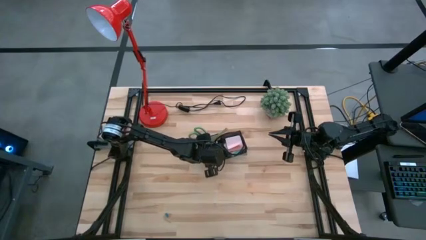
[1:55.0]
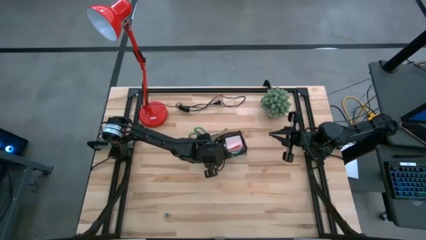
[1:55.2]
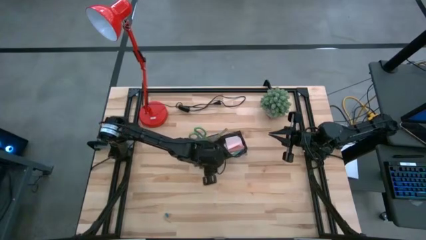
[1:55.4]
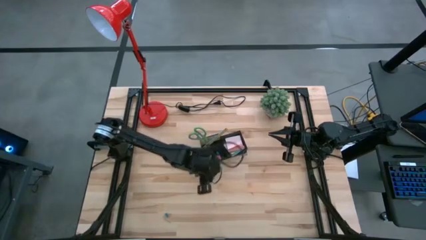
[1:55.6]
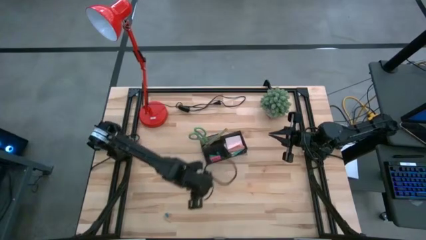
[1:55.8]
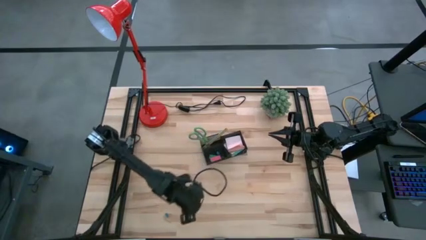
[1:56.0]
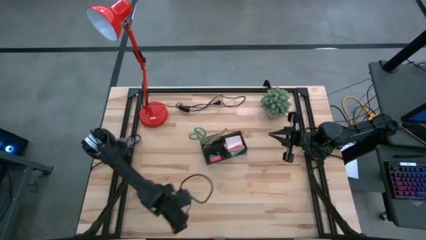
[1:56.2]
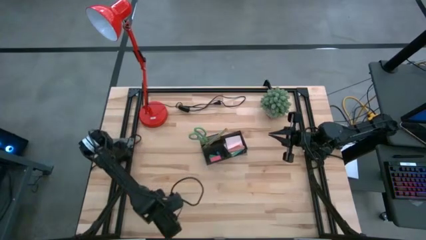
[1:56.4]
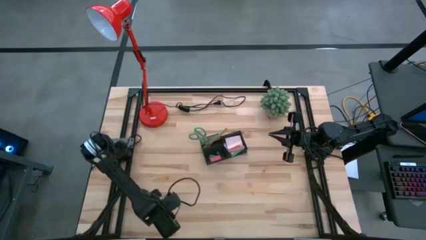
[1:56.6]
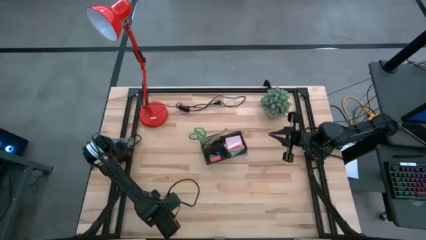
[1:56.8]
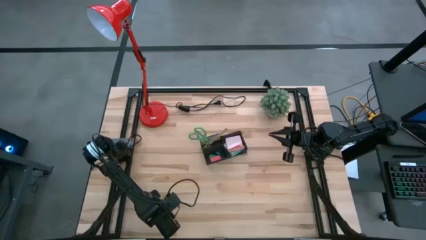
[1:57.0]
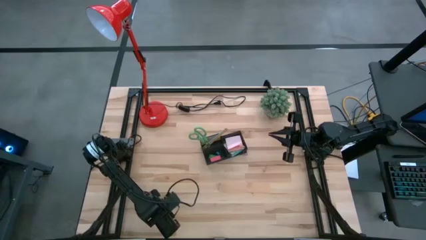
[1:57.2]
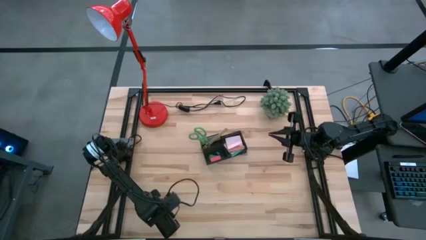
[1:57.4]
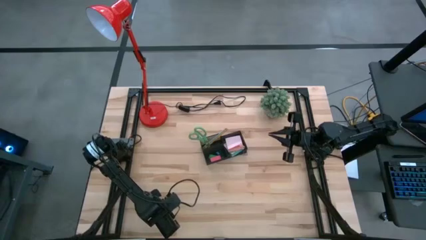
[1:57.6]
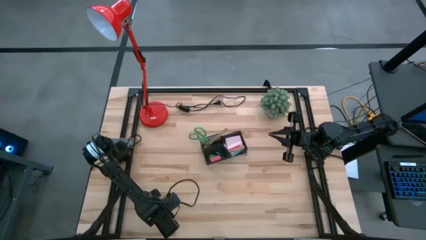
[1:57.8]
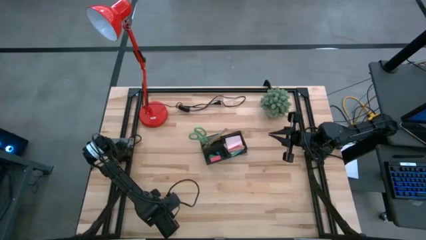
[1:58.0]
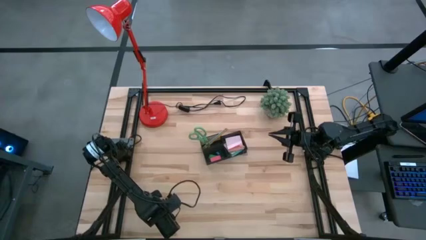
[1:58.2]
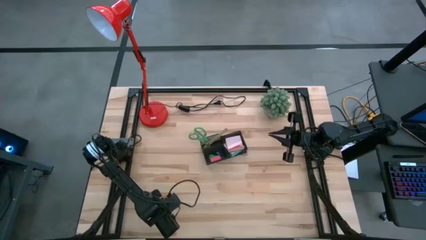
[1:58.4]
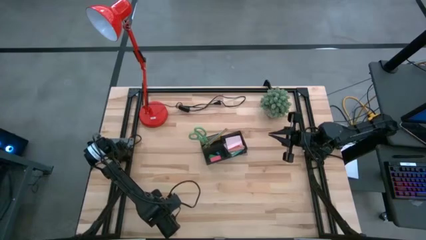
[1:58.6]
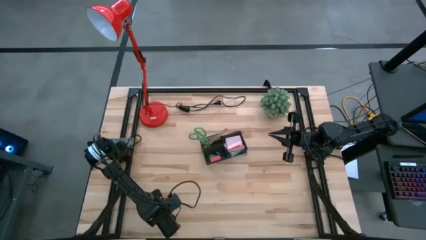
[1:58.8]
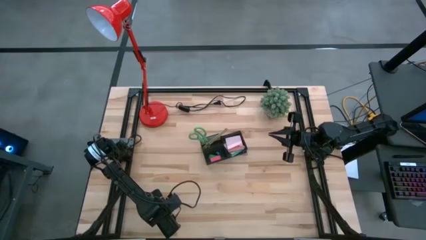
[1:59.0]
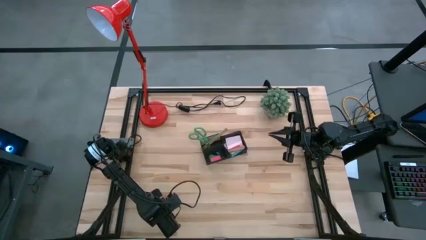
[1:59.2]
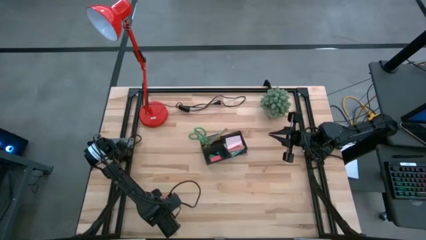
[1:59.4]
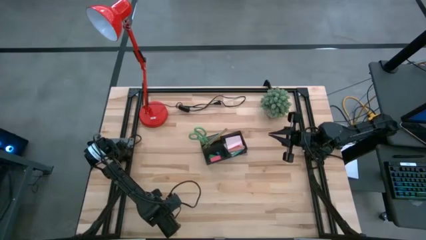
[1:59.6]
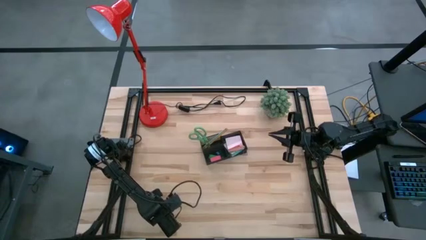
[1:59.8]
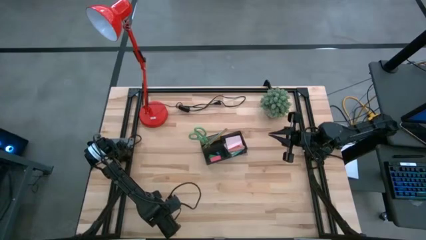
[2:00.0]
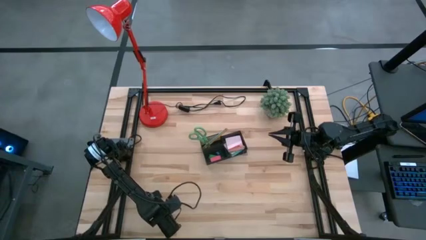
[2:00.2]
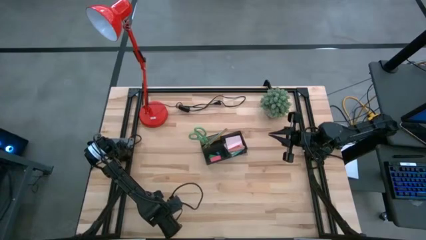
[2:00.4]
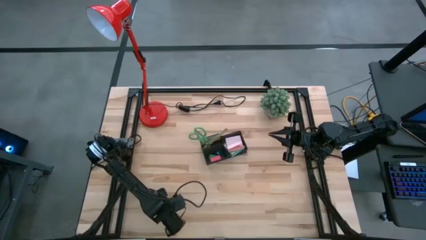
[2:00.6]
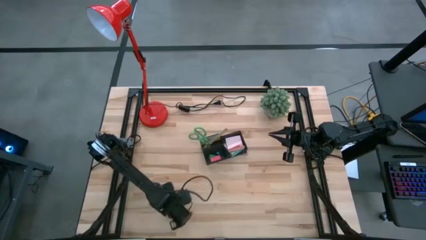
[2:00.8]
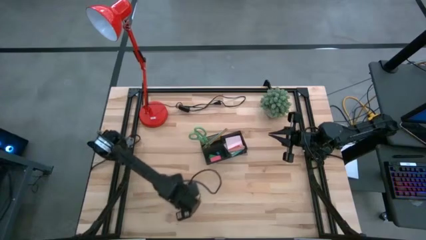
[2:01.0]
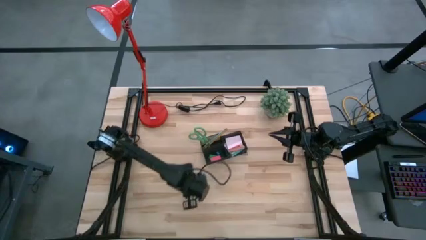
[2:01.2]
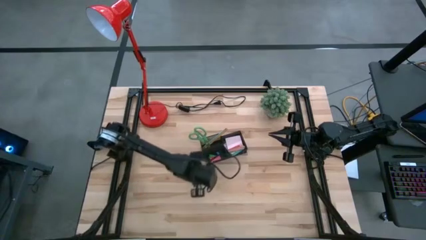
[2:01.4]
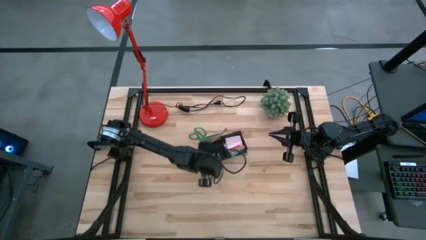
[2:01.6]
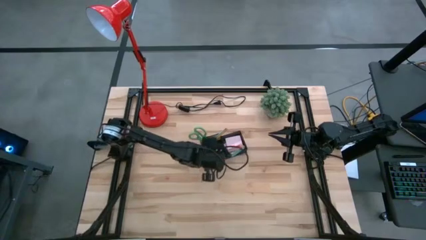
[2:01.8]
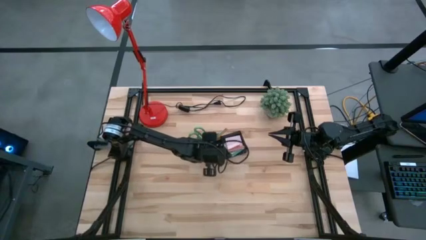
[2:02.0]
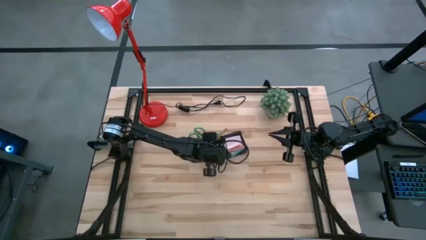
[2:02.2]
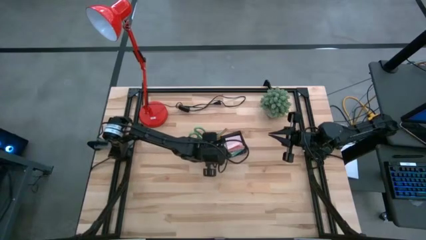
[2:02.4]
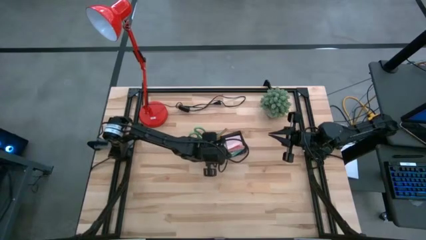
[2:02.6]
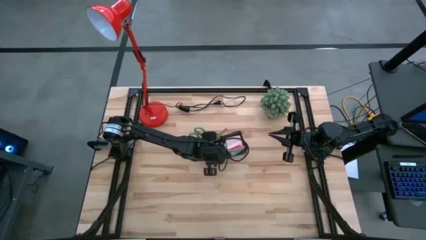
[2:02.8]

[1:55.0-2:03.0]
Task: Pick and place office supplies into organizer
Put the blue binder clip into the black desk organizer

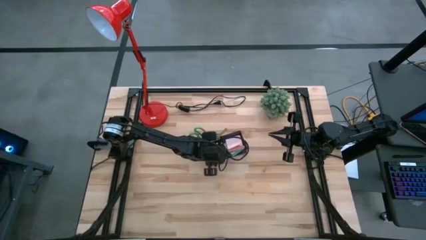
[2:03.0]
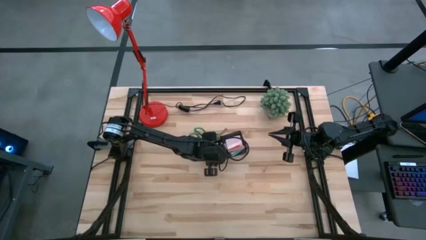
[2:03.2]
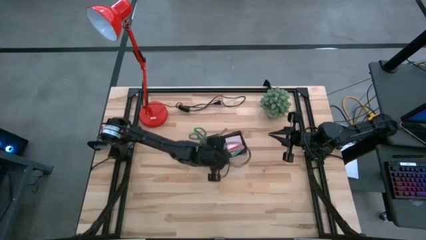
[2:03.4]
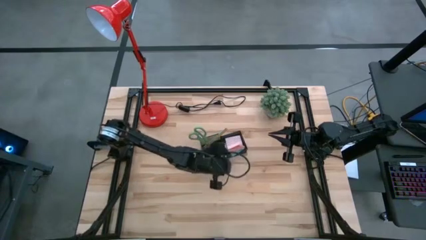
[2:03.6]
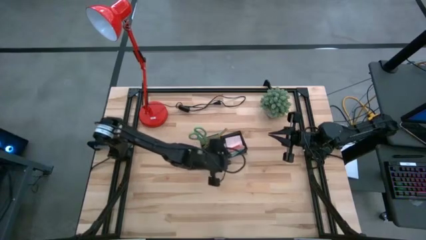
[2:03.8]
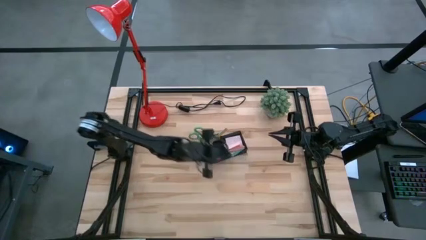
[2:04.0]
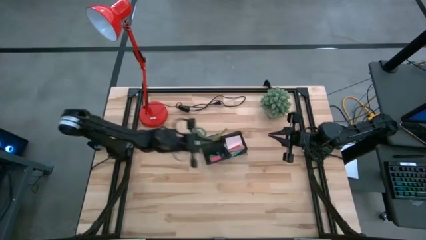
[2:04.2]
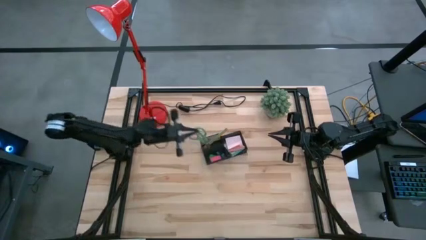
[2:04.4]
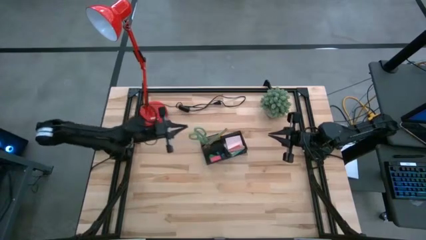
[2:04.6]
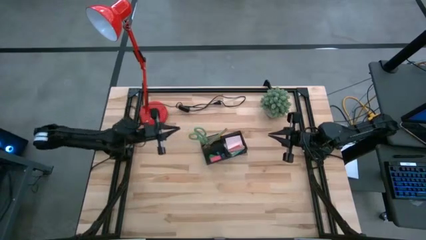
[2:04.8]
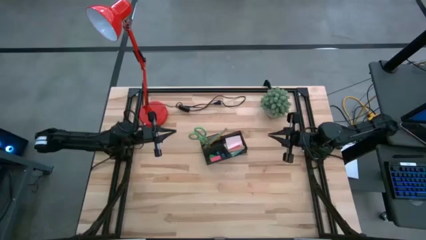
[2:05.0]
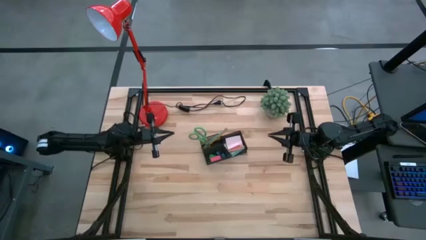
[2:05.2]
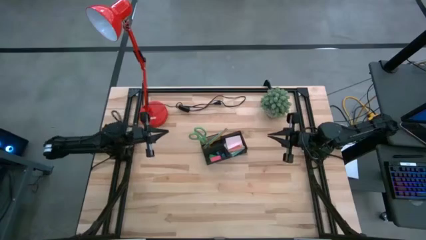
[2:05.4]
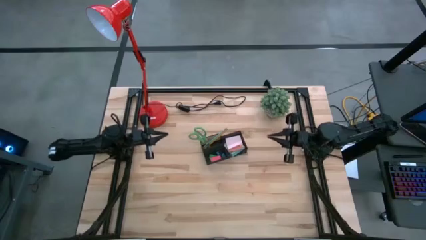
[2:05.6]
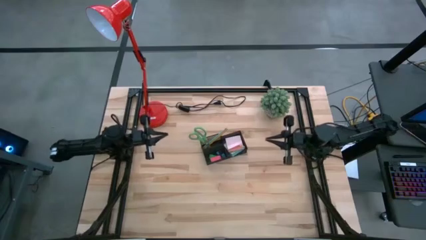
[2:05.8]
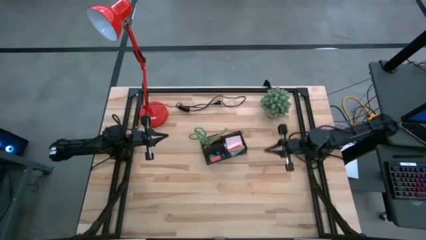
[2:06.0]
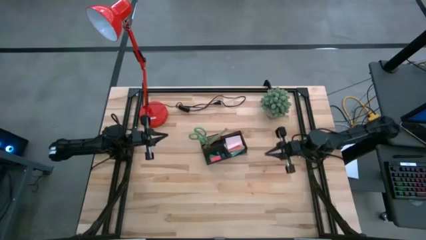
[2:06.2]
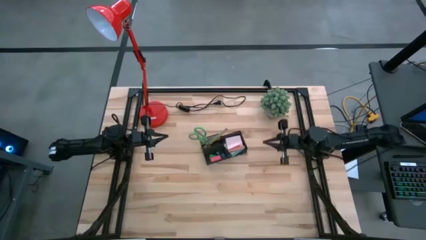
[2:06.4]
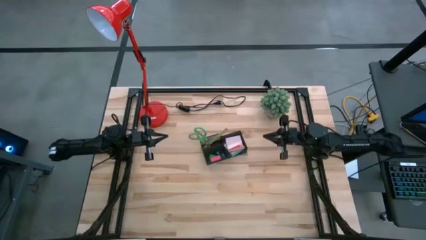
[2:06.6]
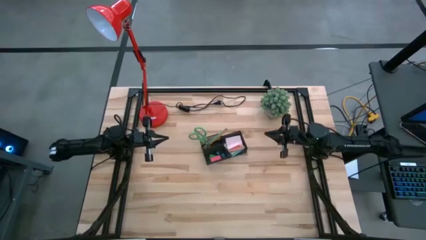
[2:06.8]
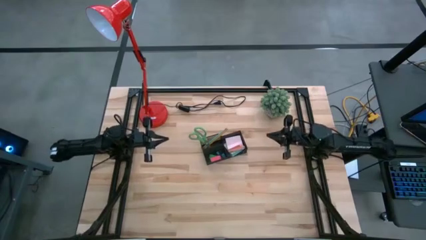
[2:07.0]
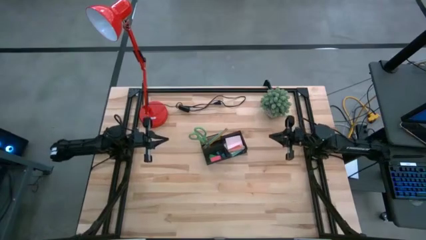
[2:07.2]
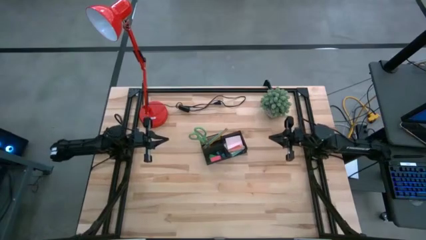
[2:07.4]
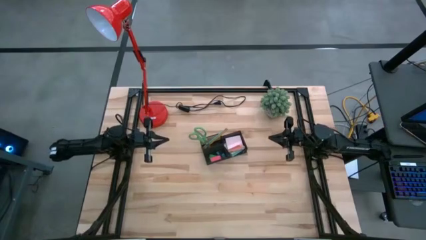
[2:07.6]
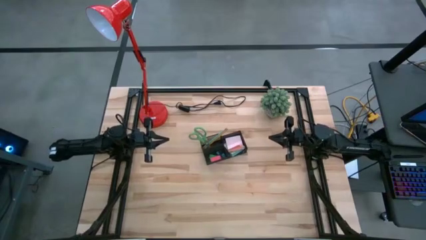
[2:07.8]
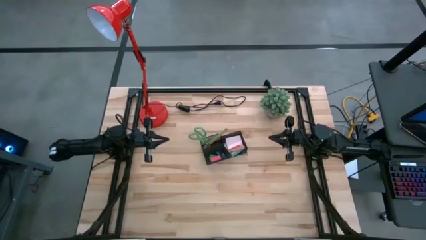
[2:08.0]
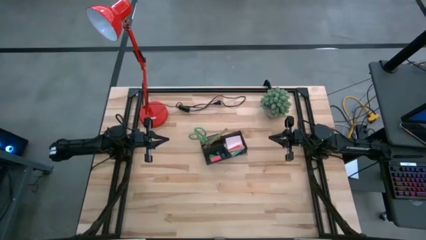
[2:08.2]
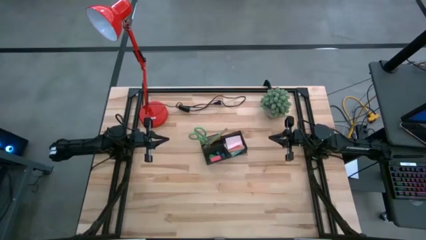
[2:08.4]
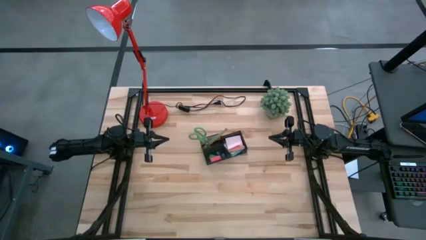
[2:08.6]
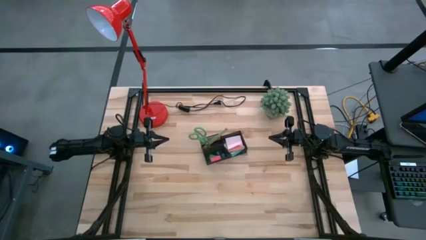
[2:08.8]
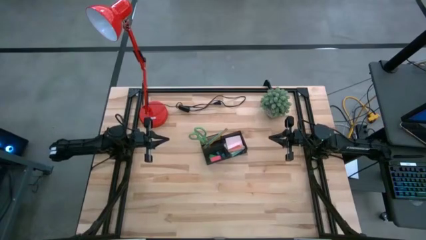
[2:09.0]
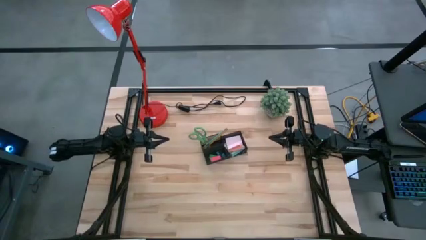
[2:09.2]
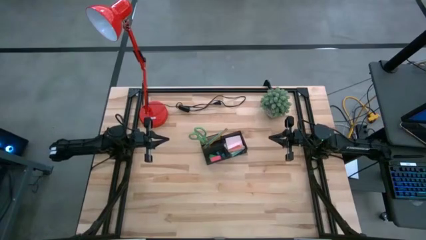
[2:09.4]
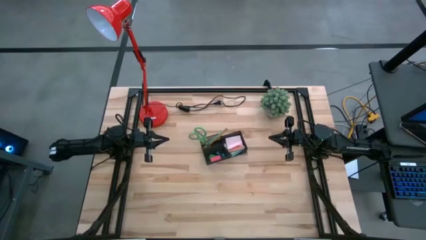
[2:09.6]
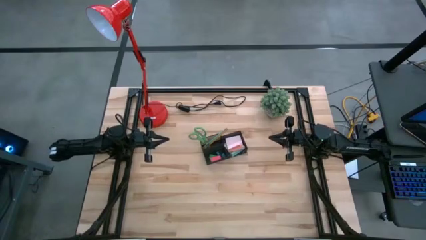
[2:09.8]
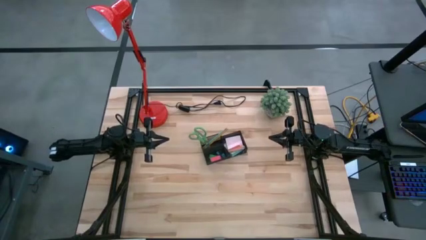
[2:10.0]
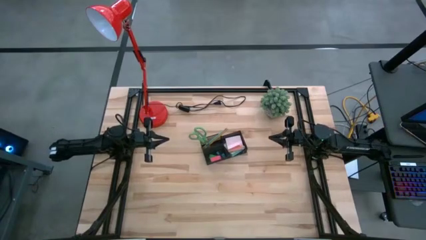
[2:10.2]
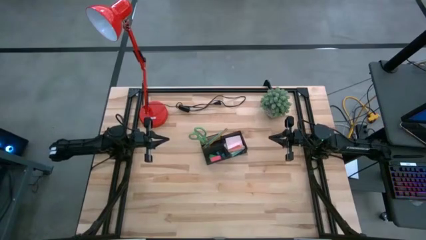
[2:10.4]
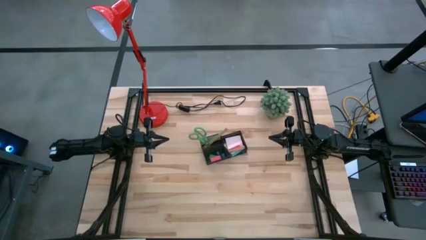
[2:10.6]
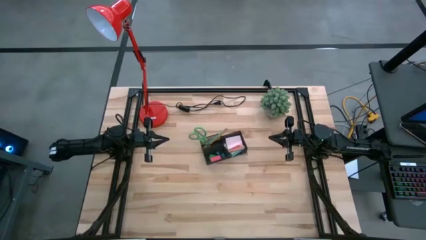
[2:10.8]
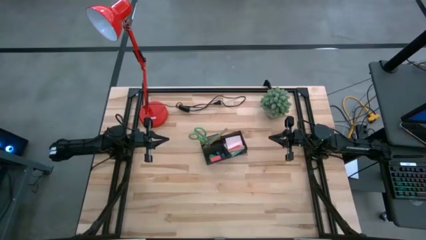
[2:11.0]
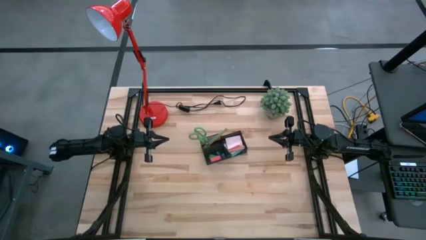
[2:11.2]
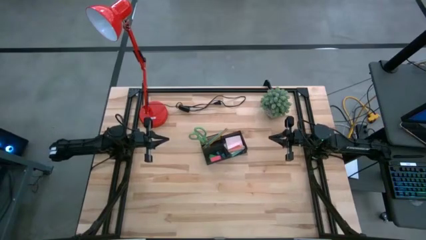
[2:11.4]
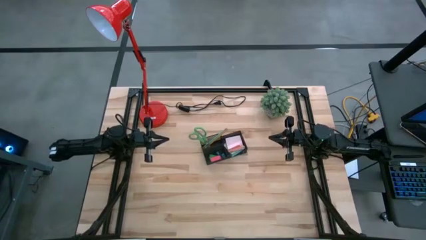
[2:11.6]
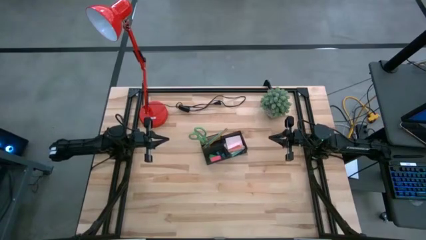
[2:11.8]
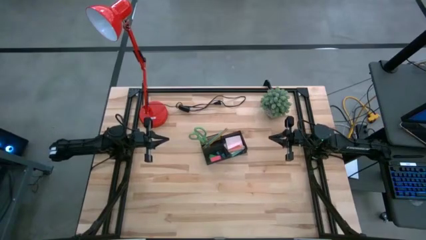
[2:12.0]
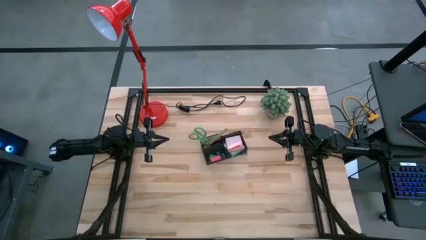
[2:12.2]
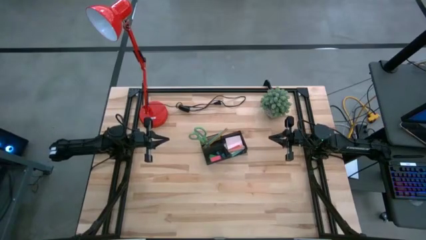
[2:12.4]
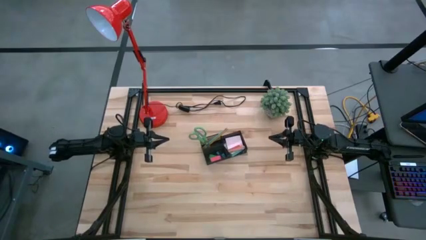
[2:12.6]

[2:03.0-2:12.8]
Return to Home Position
